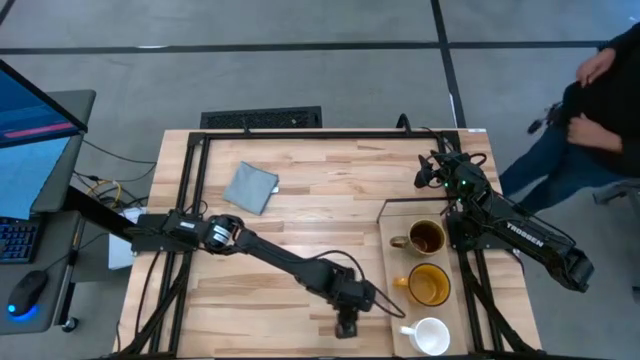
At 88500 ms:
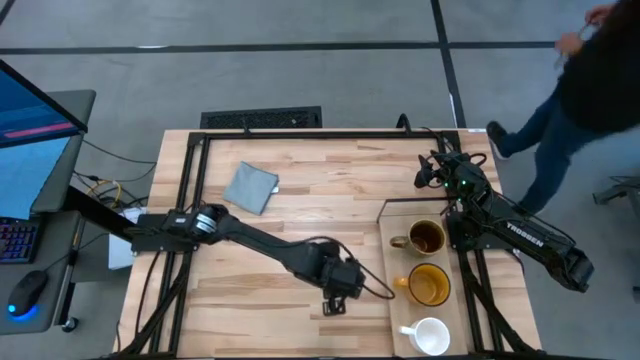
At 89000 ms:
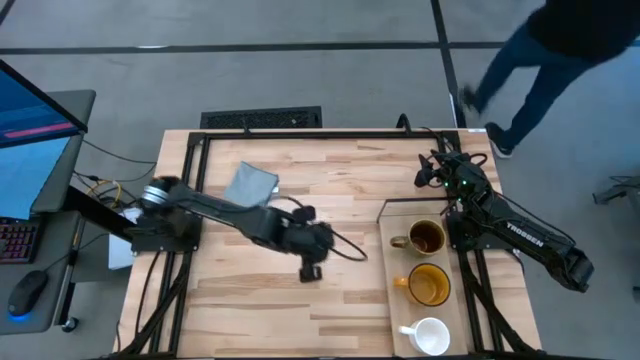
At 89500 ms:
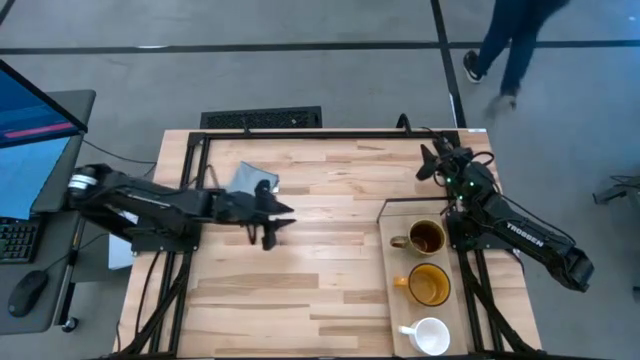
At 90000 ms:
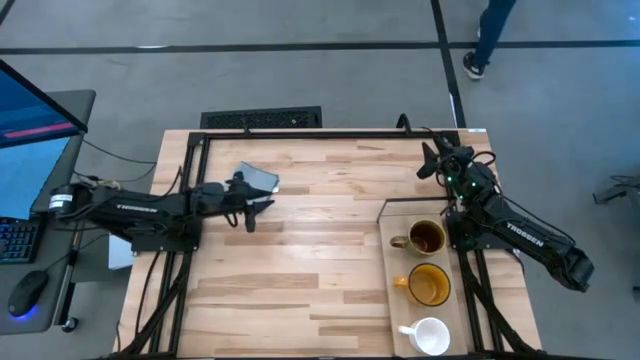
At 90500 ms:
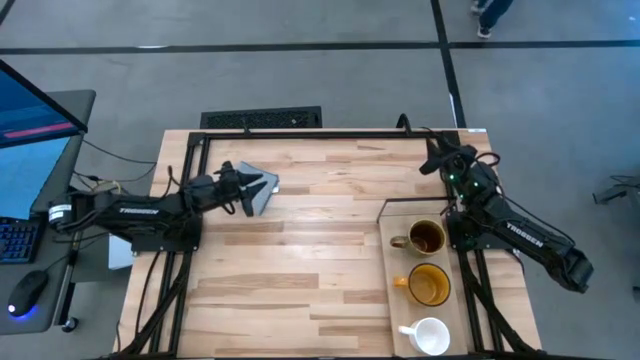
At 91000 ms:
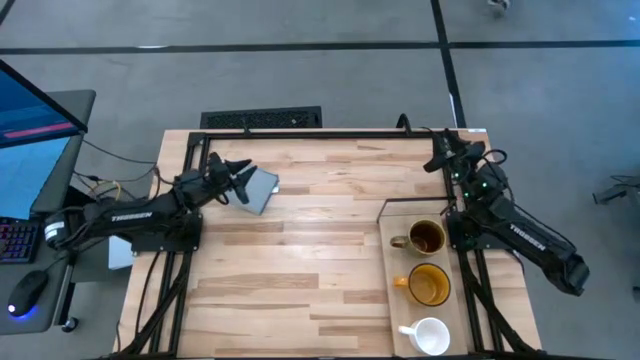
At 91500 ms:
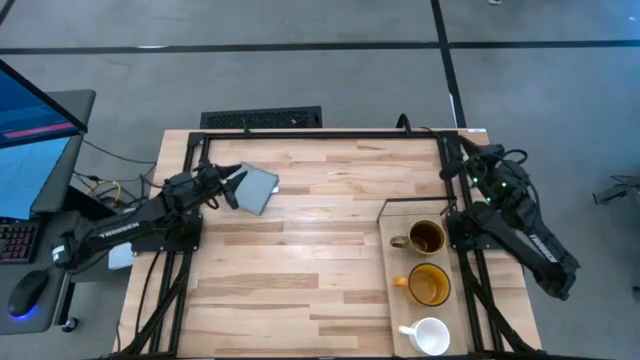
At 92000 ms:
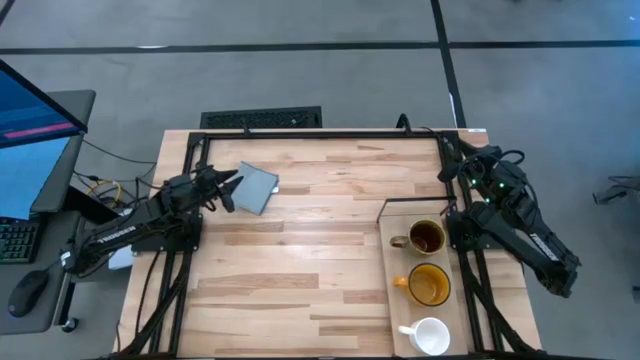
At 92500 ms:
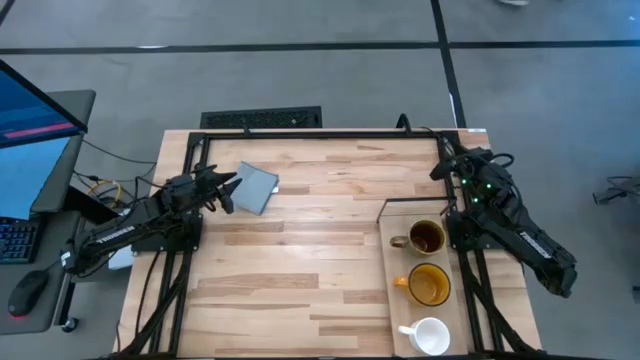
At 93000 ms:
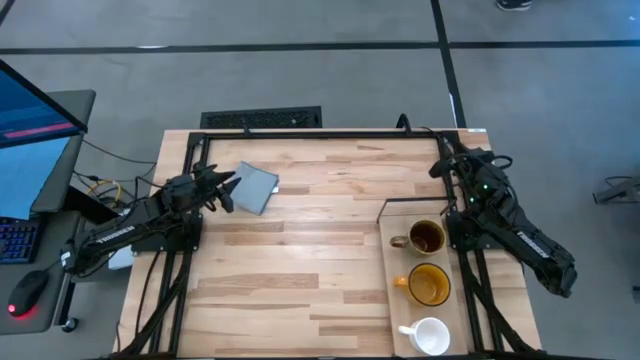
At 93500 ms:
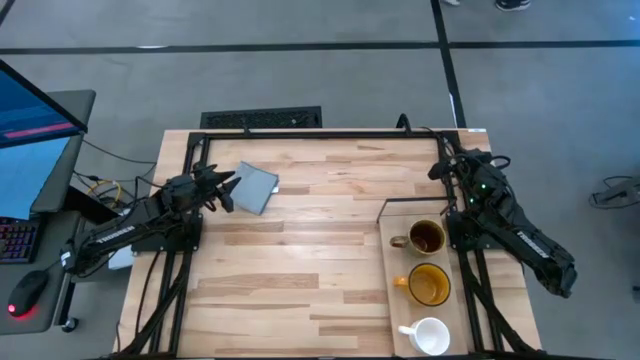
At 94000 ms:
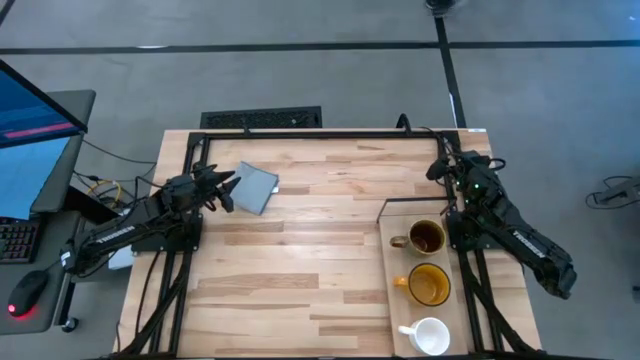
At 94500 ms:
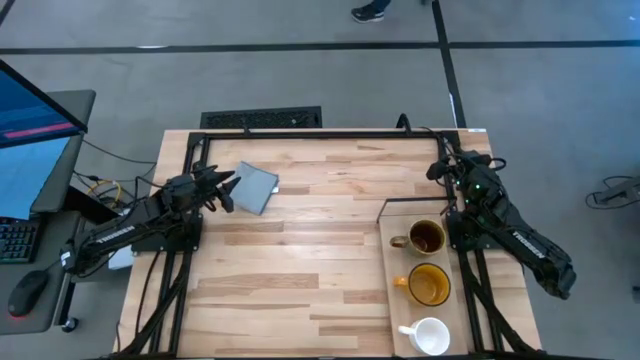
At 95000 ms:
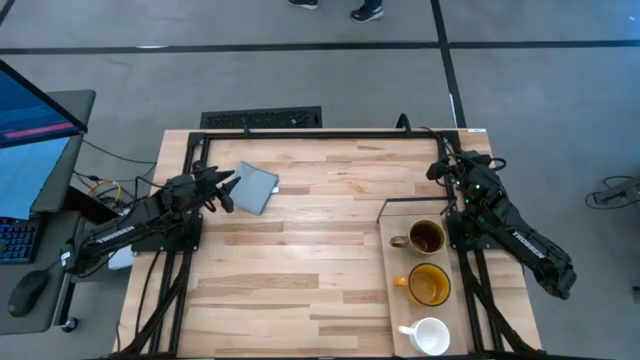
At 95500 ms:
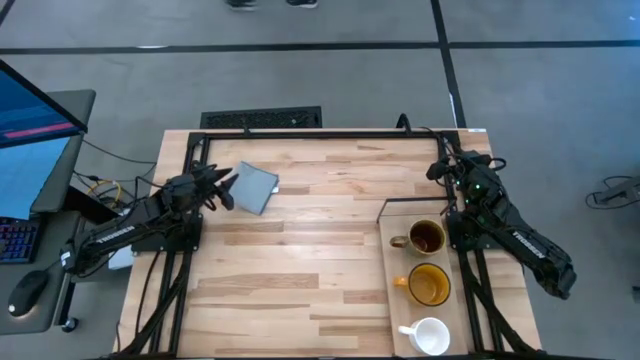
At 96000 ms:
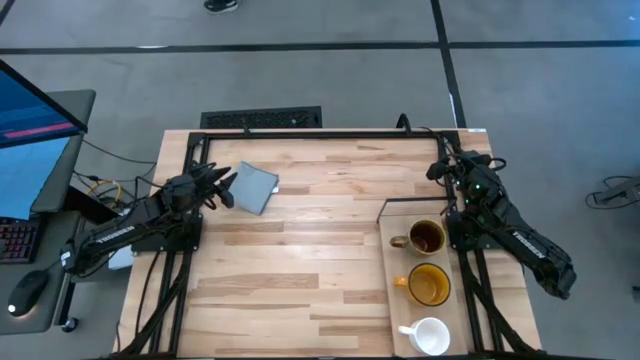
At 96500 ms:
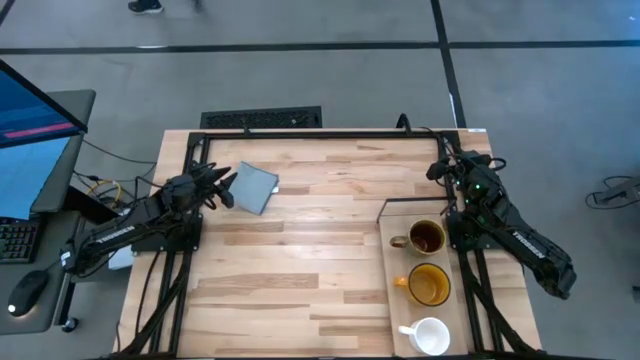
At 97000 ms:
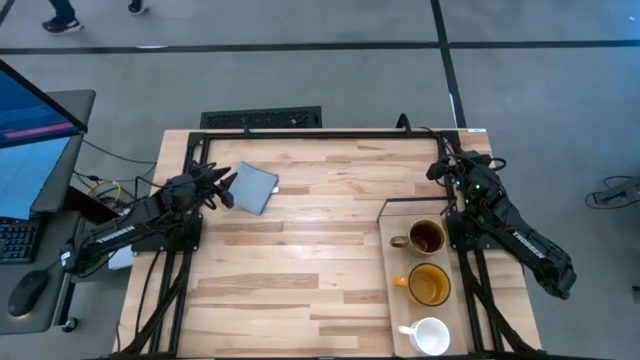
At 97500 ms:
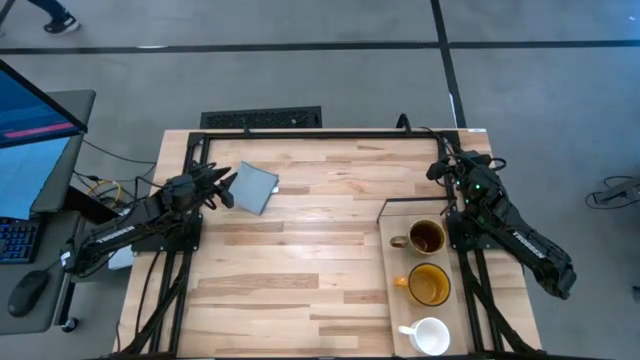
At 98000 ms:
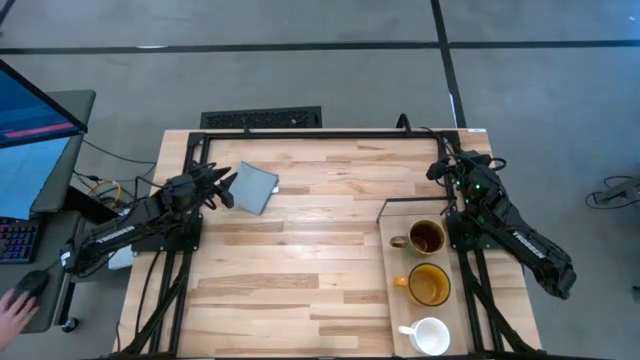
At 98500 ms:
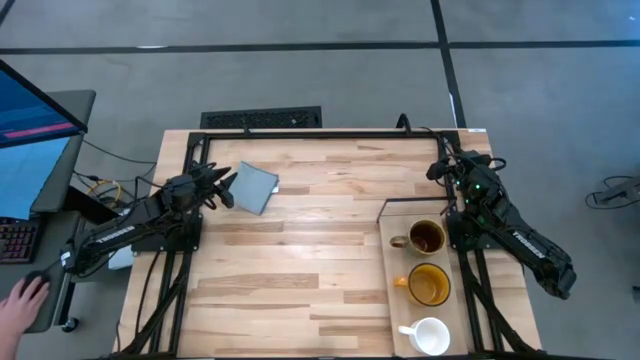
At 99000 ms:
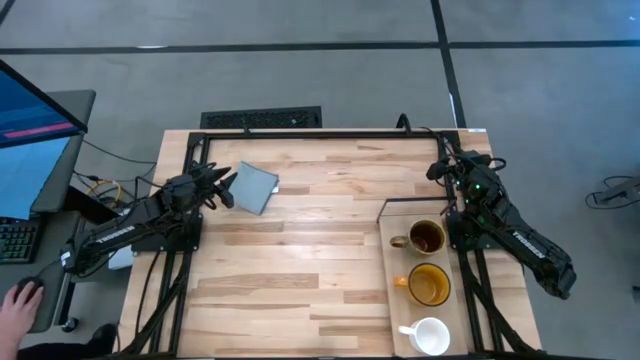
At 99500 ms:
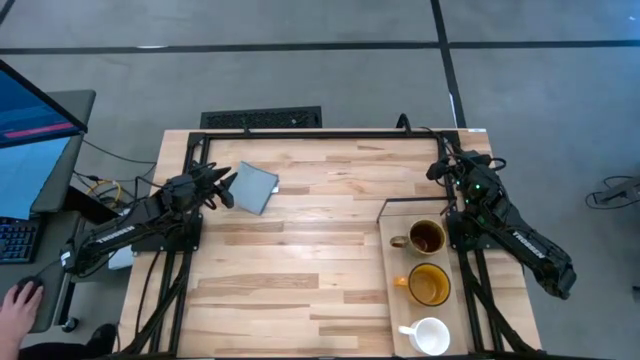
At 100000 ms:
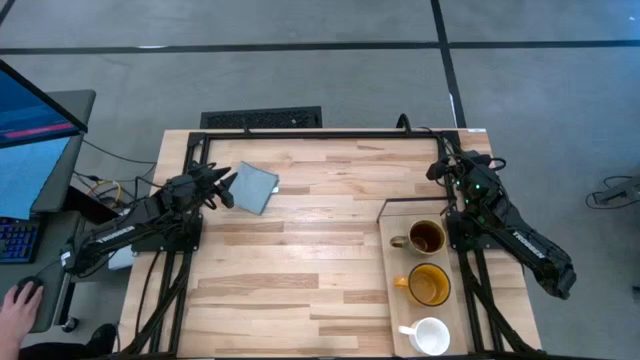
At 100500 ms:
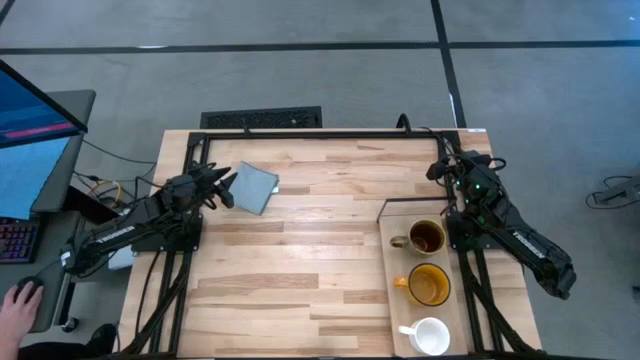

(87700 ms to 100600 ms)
Task: Stack small to large cups/mugs on shelf
Return to Home Position

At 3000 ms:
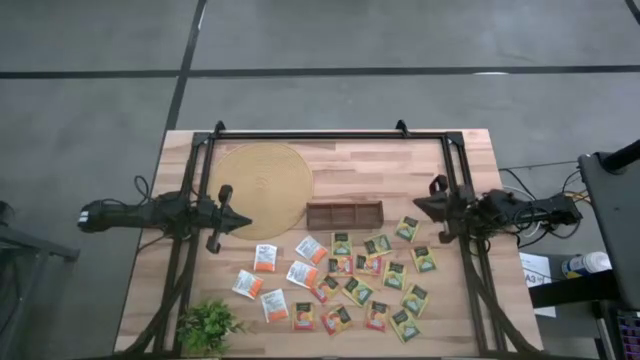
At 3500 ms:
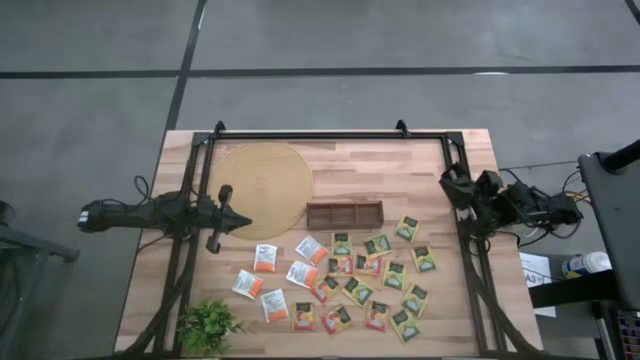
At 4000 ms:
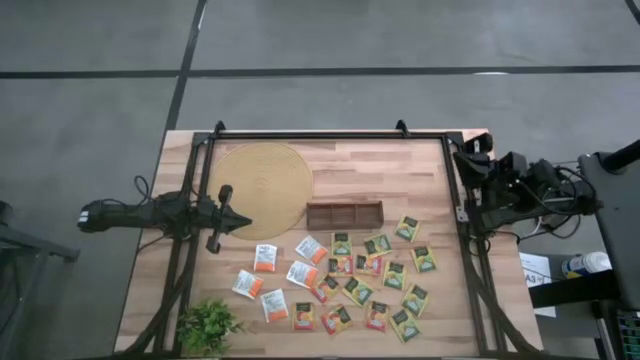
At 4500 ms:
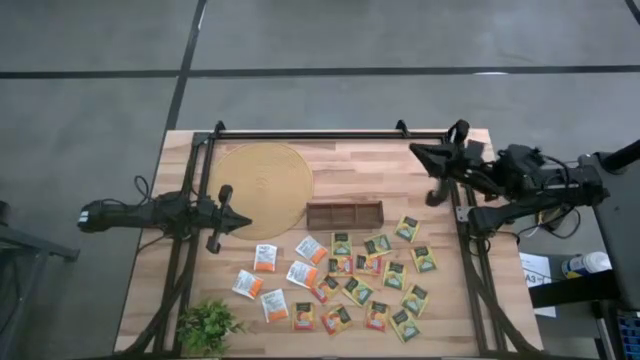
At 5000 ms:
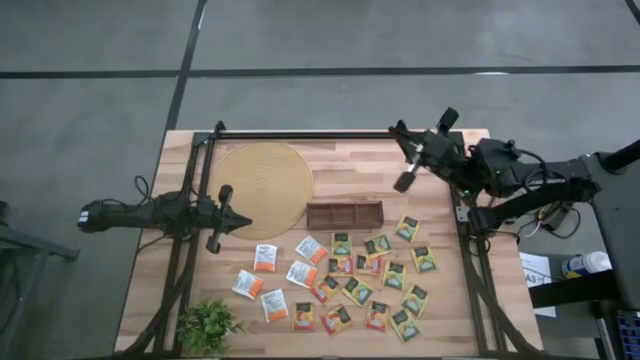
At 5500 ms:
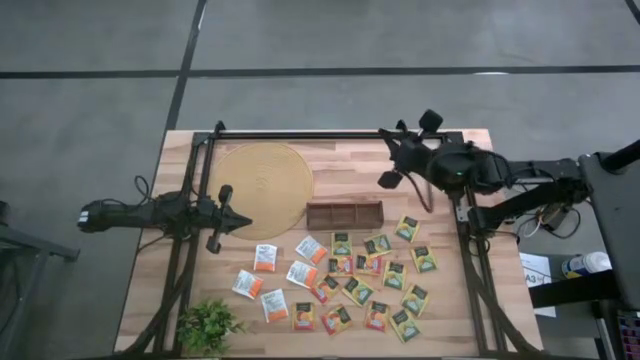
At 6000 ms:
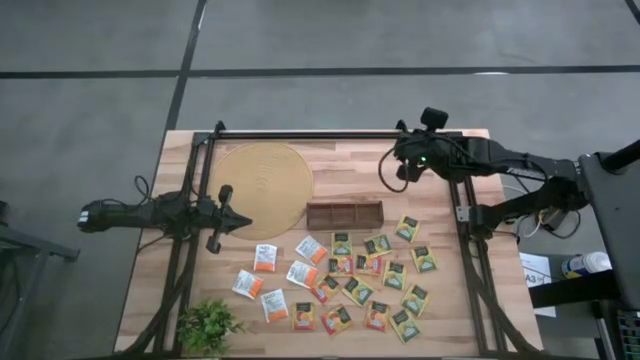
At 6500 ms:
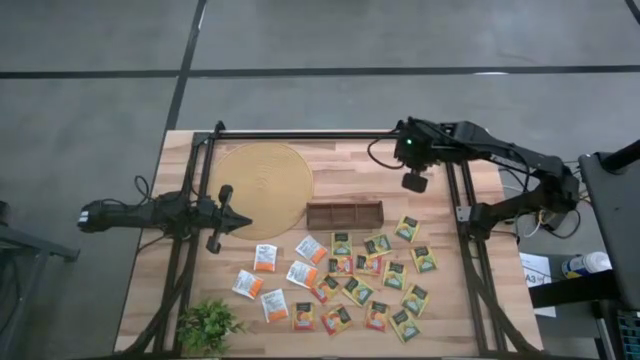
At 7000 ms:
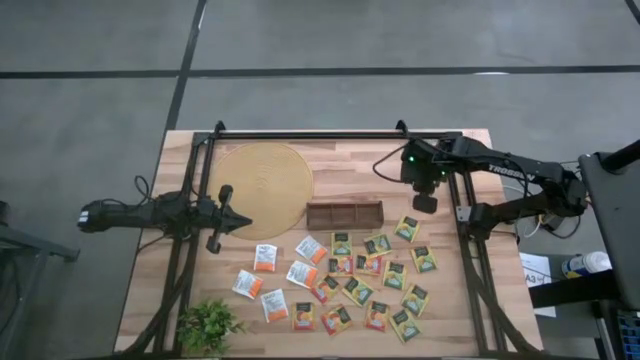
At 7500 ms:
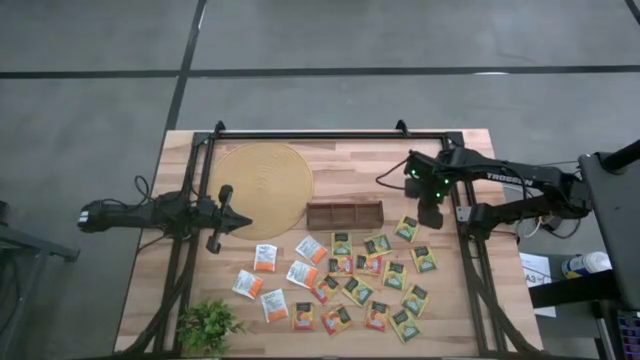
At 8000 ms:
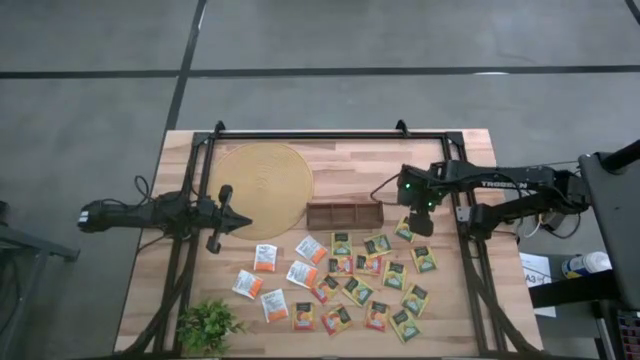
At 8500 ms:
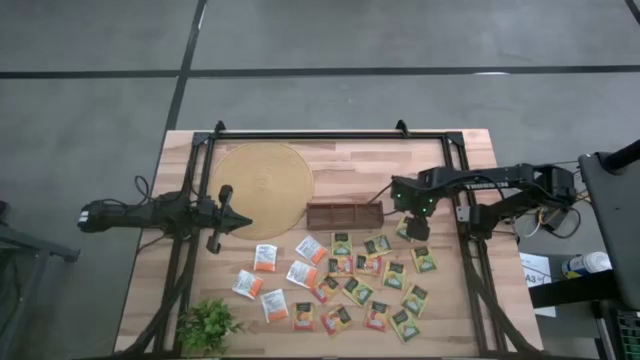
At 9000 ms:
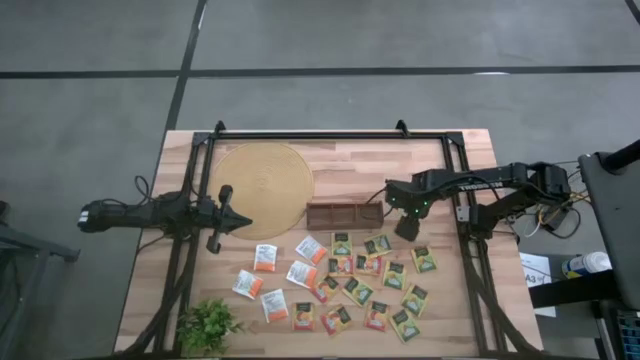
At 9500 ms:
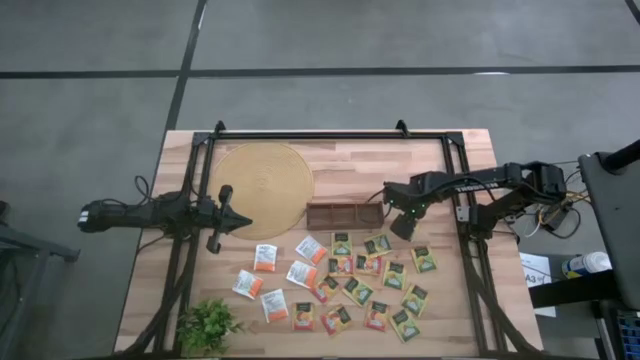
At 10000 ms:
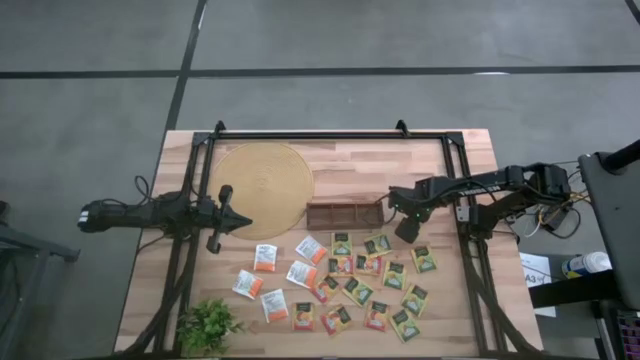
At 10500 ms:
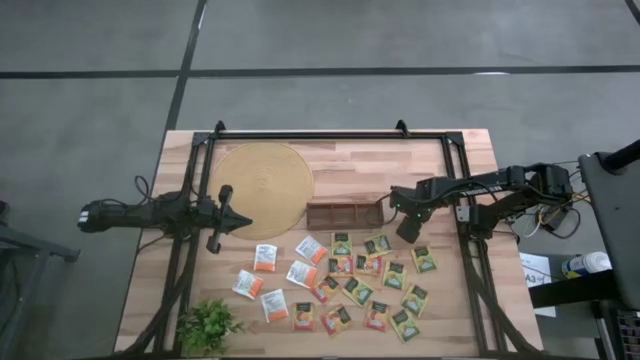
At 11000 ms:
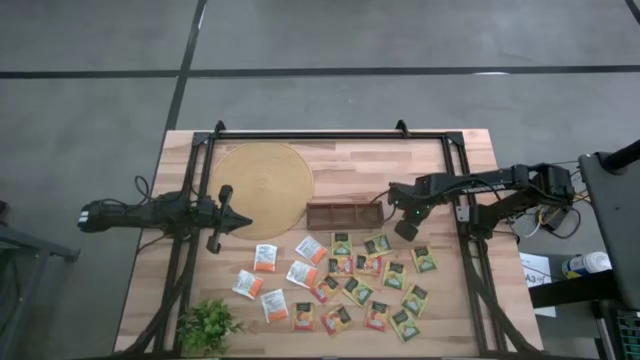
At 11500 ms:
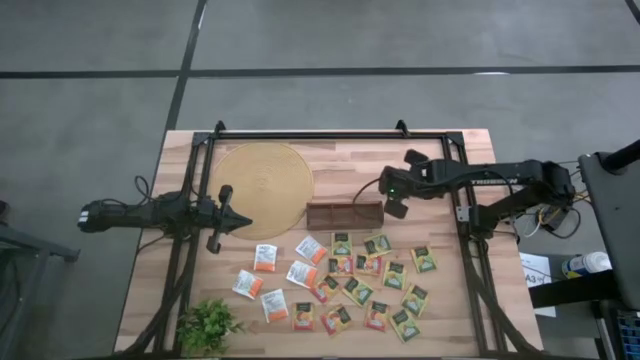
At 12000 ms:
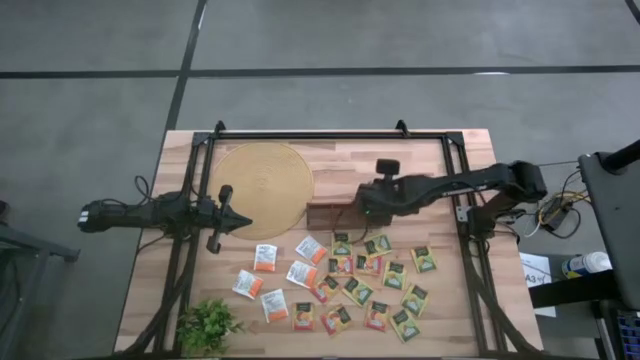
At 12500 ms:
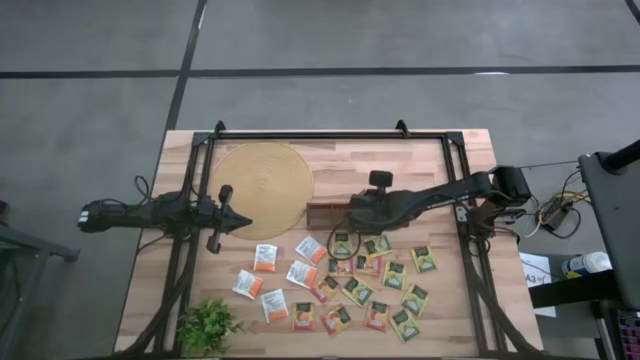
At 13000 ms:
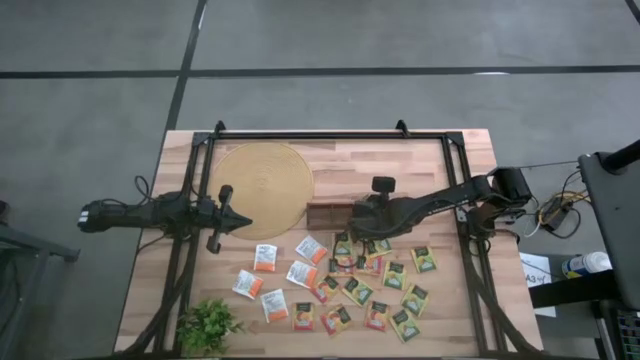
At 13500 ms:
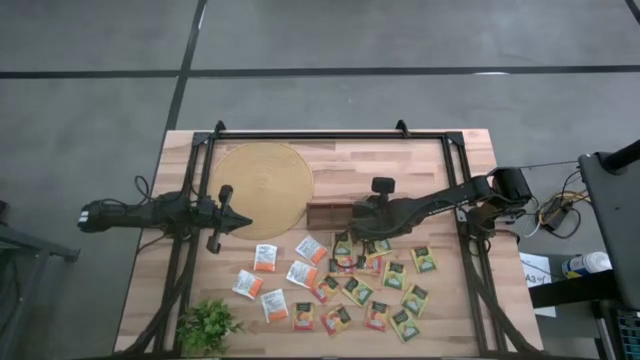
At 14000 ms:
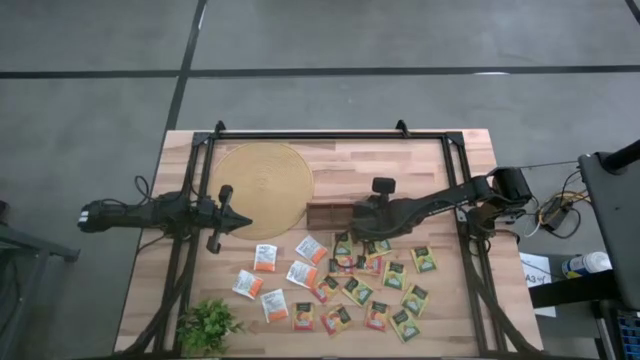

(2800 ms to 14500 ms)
Task: Pick & Place Tea
Put the yellow tea bag into the right section of the wooden organizer
